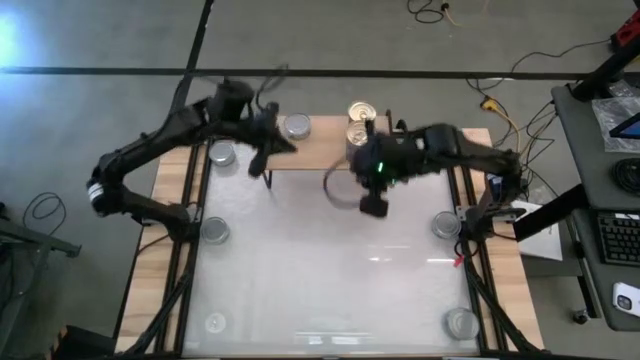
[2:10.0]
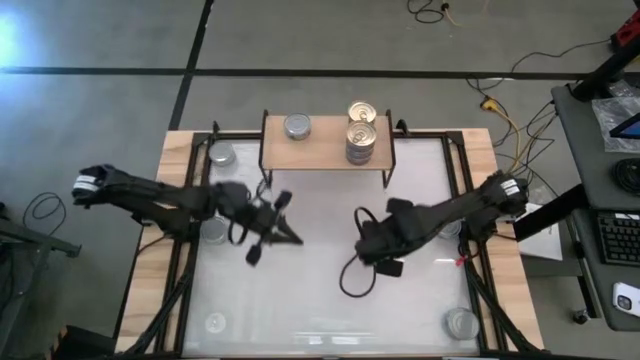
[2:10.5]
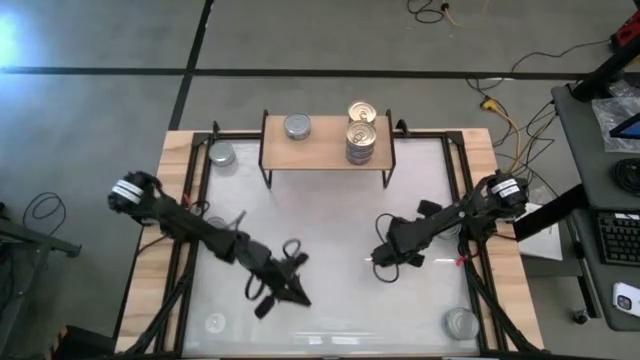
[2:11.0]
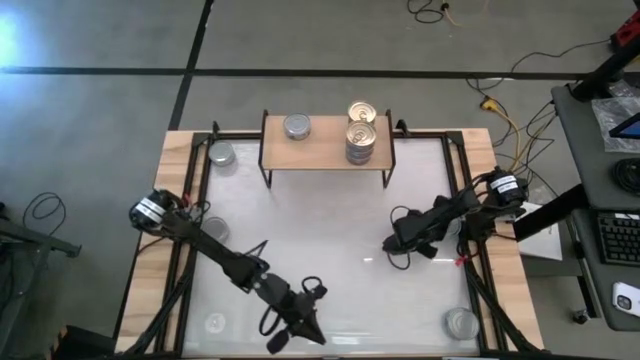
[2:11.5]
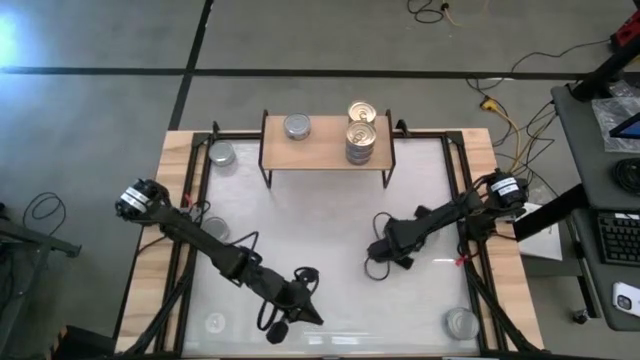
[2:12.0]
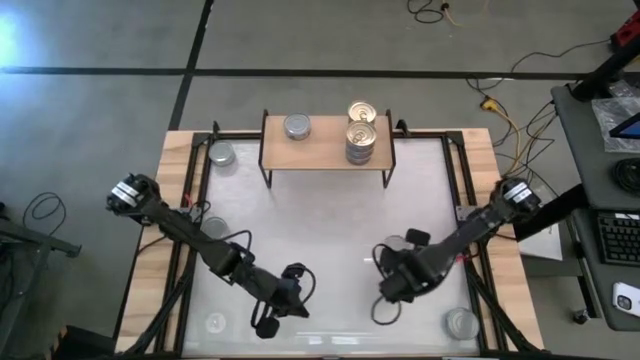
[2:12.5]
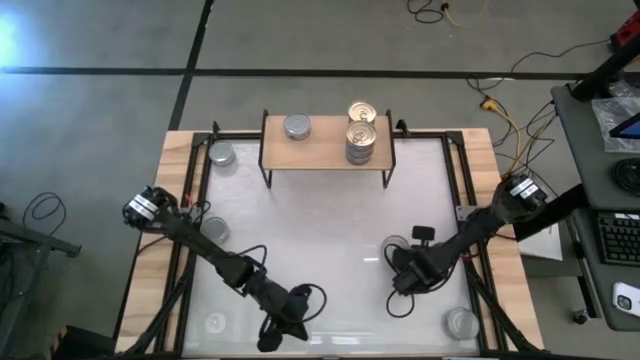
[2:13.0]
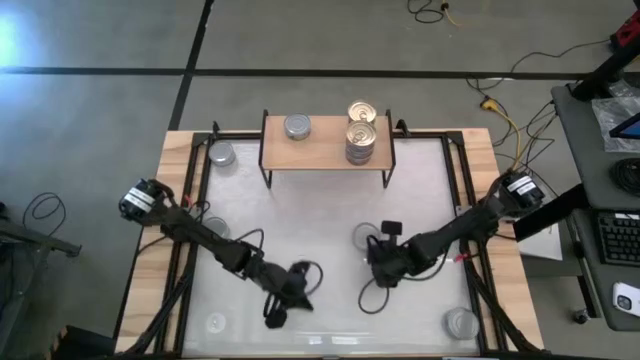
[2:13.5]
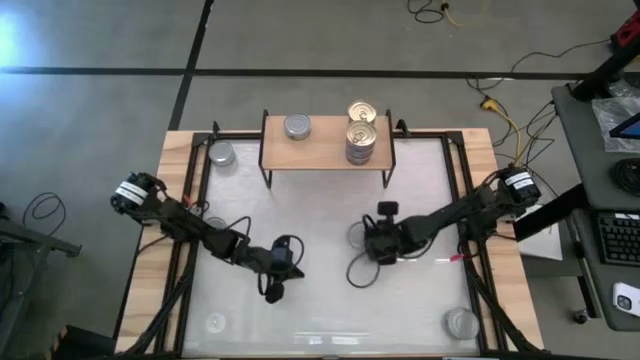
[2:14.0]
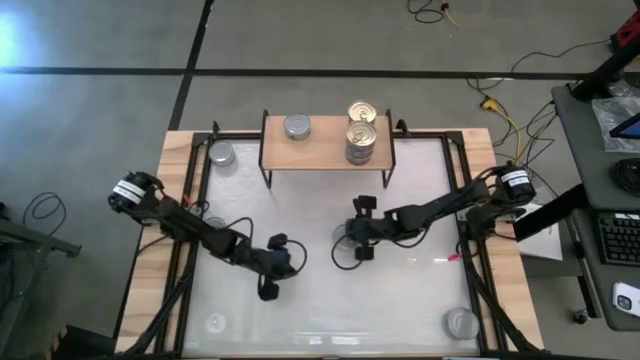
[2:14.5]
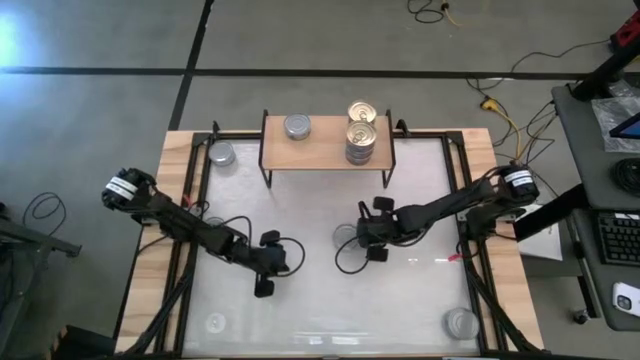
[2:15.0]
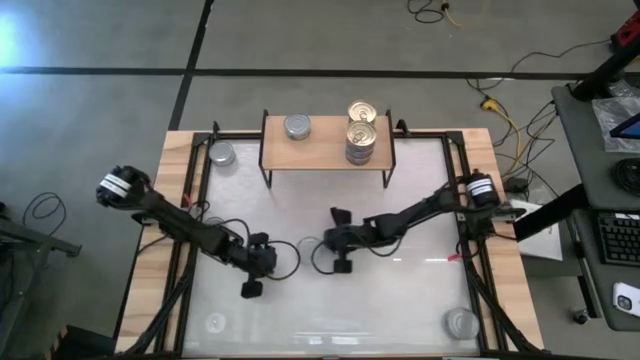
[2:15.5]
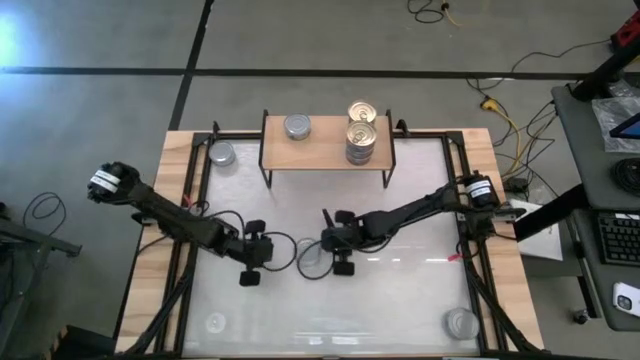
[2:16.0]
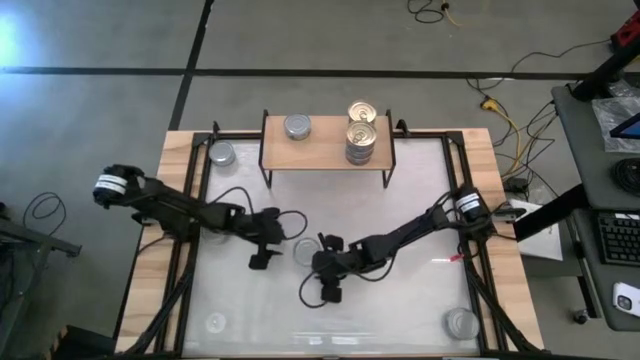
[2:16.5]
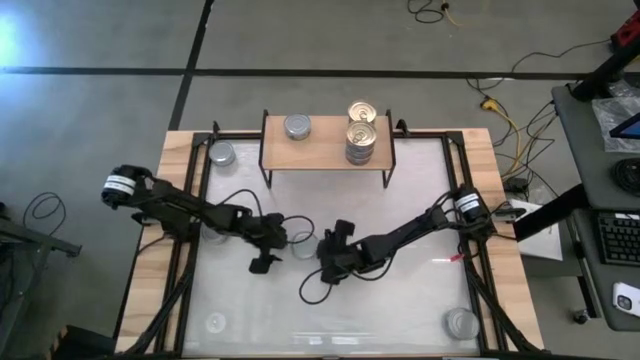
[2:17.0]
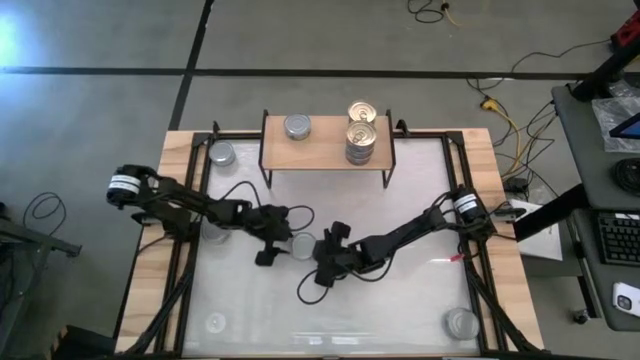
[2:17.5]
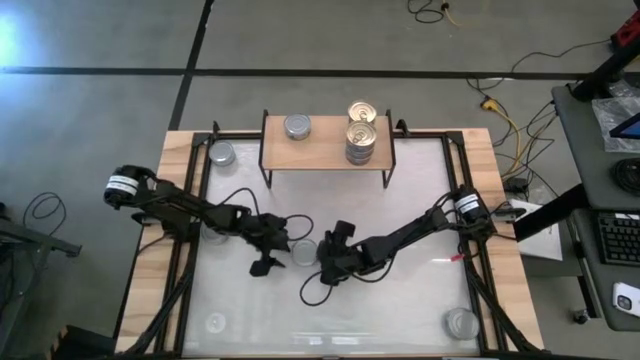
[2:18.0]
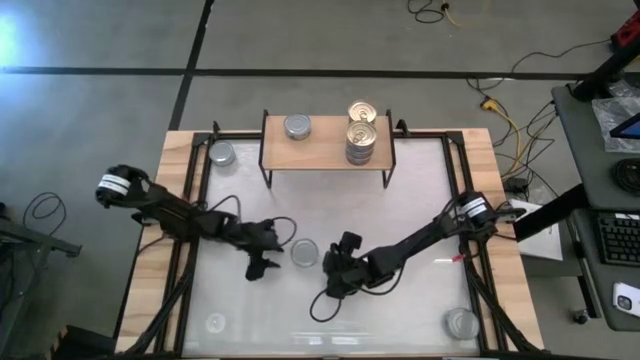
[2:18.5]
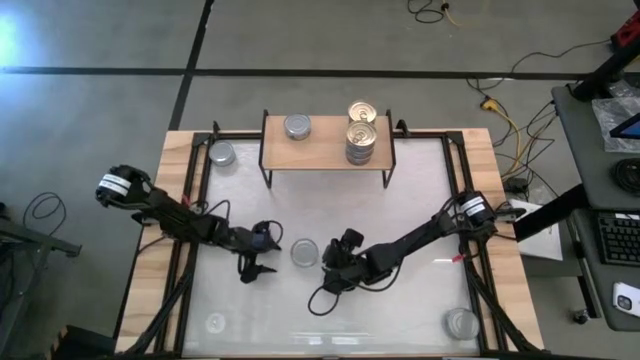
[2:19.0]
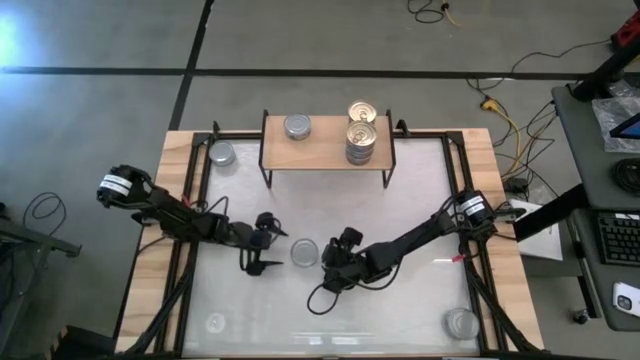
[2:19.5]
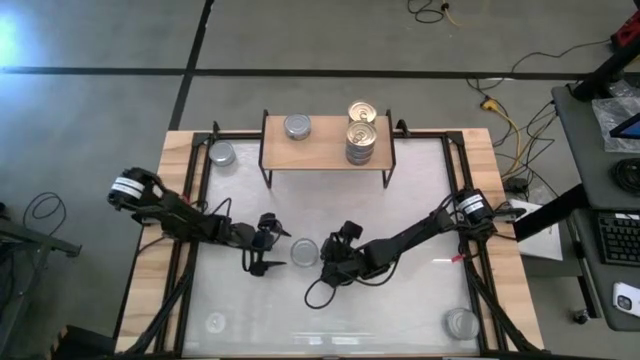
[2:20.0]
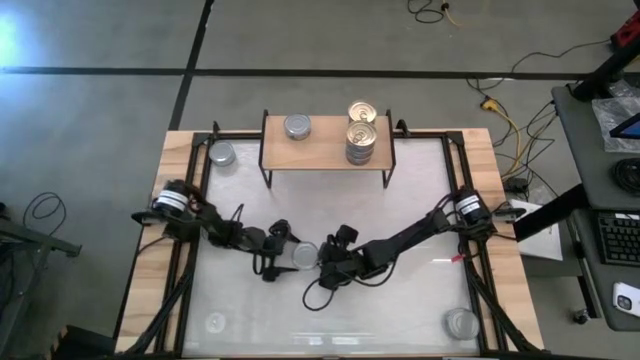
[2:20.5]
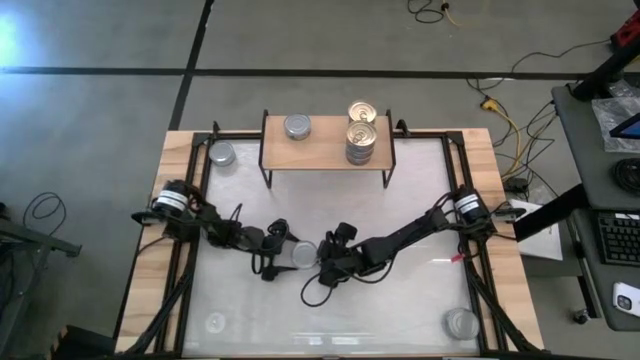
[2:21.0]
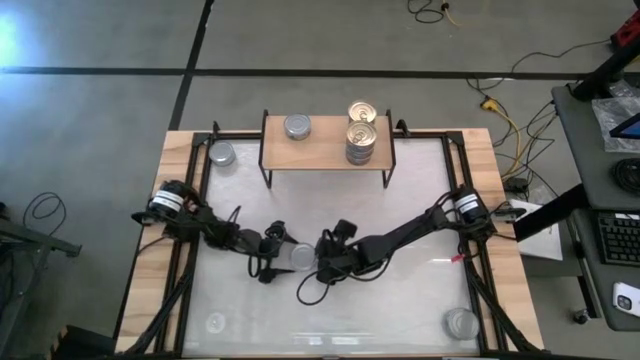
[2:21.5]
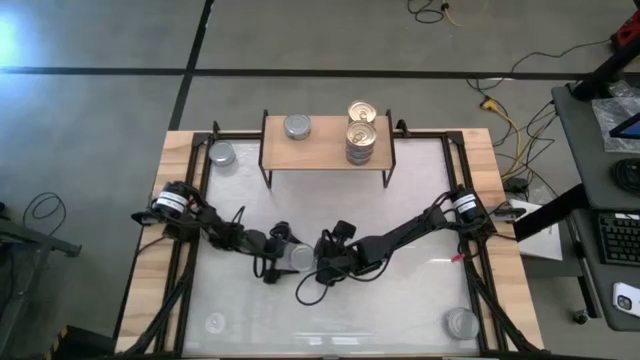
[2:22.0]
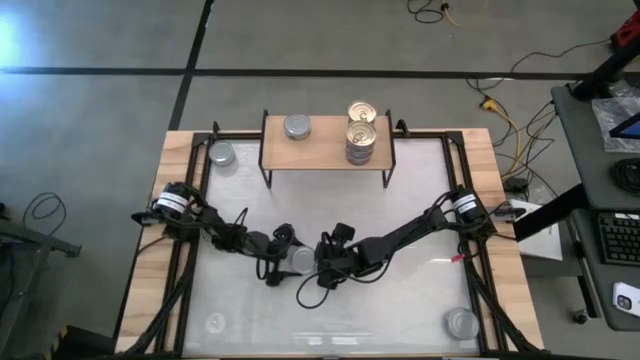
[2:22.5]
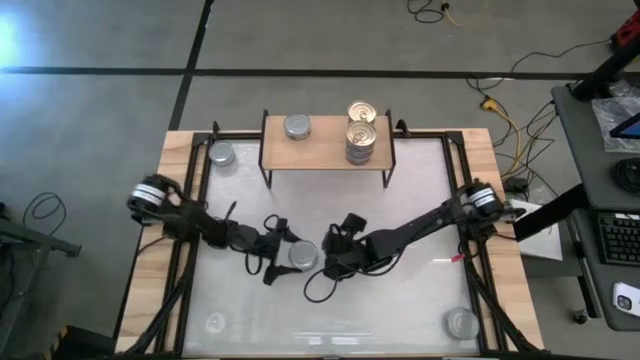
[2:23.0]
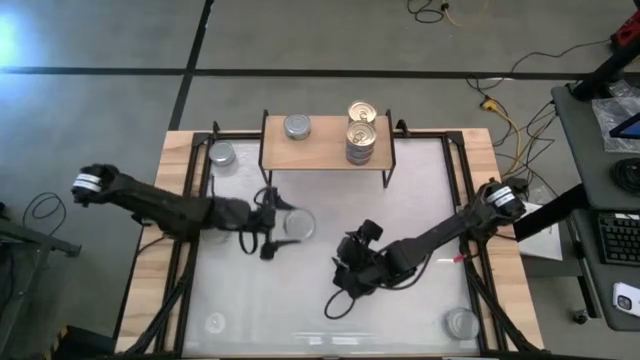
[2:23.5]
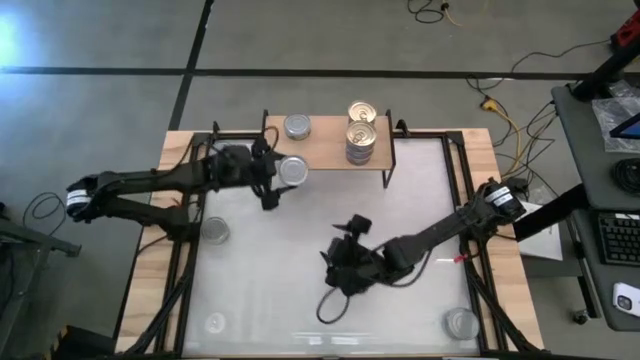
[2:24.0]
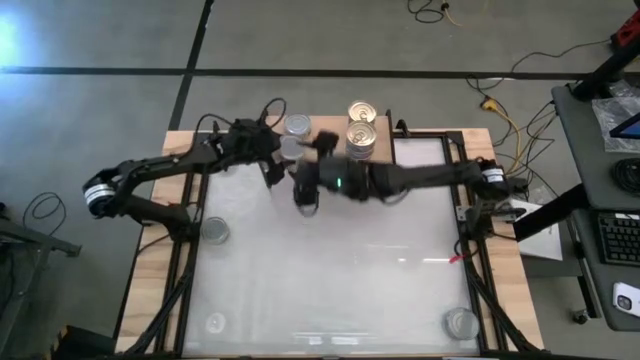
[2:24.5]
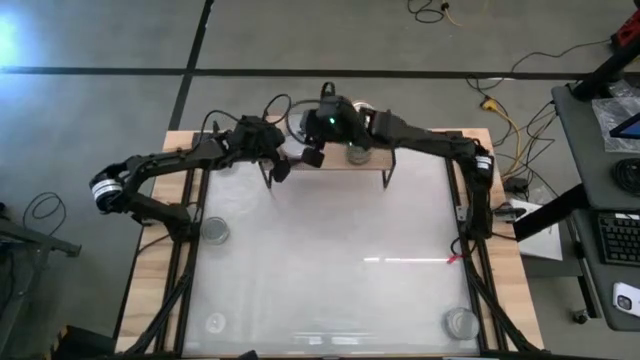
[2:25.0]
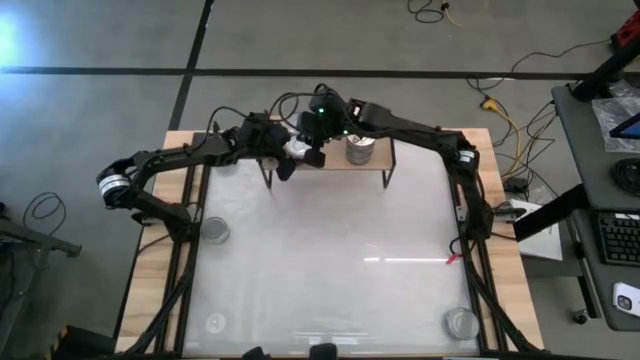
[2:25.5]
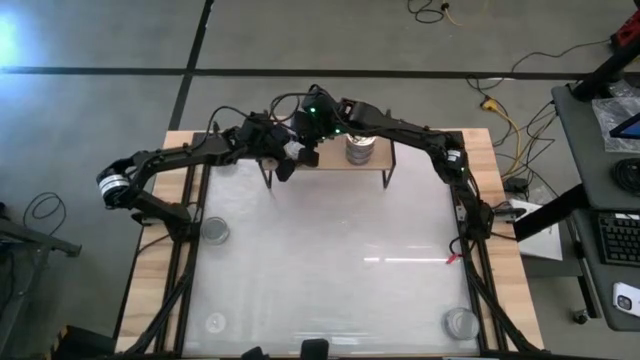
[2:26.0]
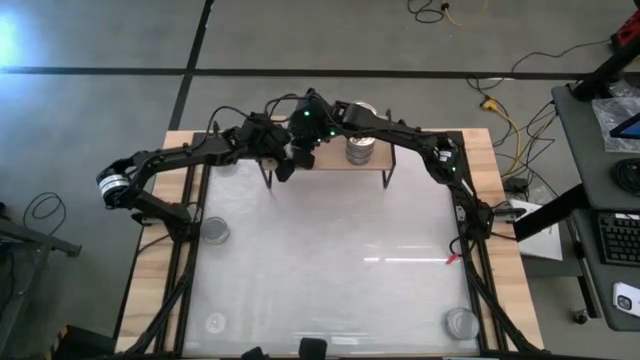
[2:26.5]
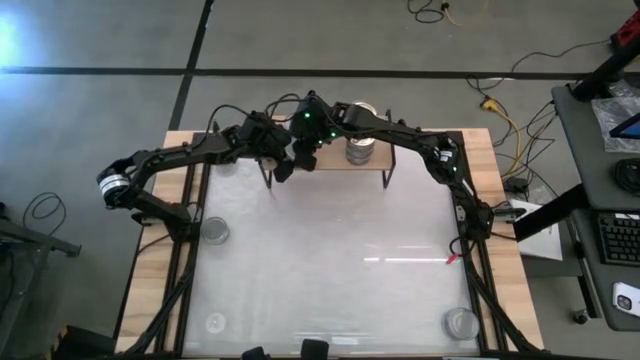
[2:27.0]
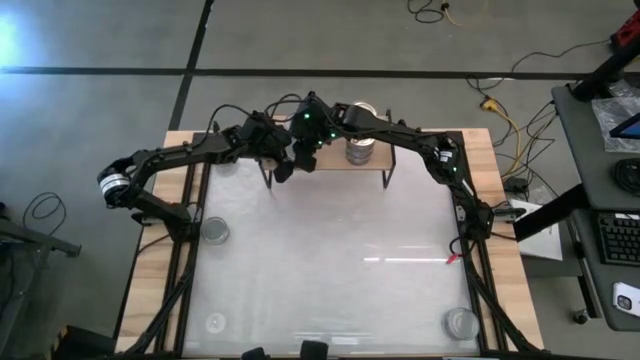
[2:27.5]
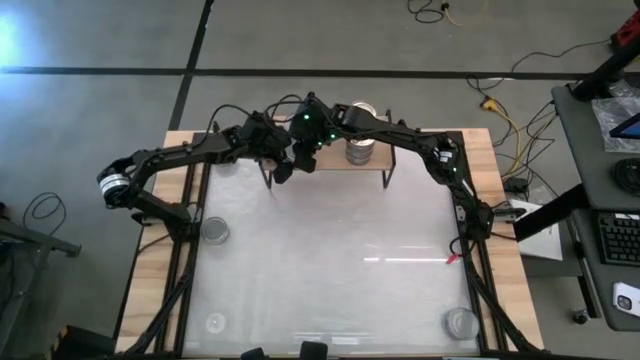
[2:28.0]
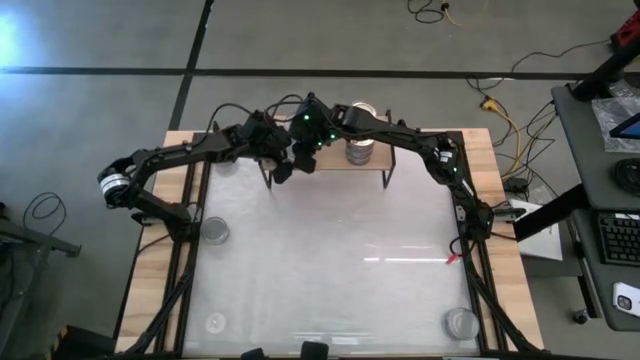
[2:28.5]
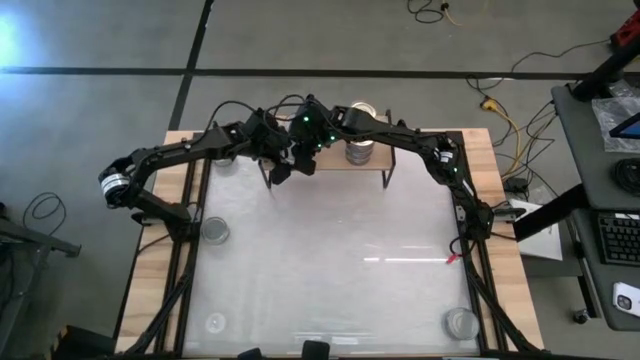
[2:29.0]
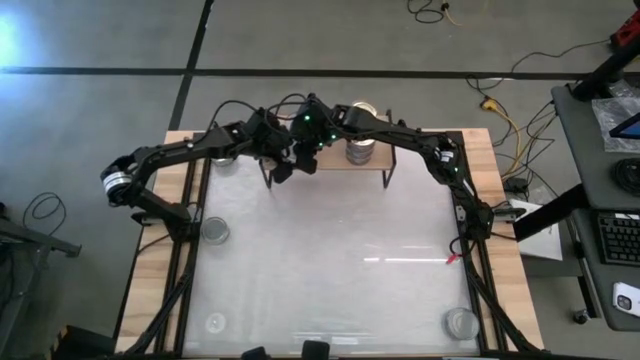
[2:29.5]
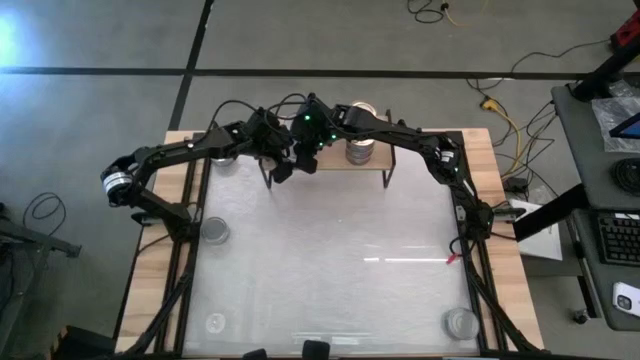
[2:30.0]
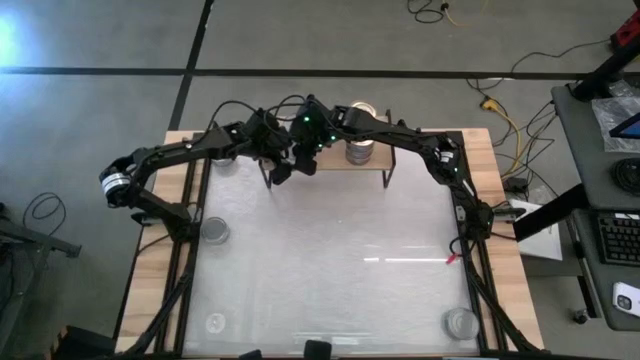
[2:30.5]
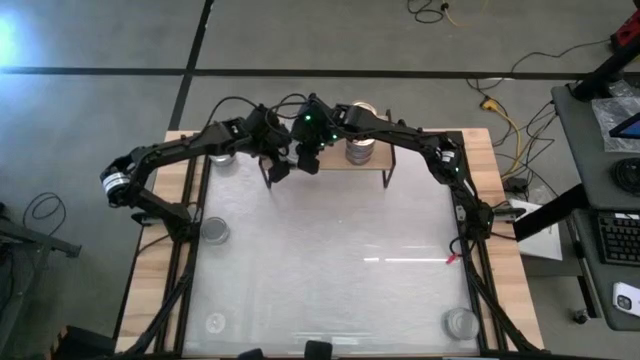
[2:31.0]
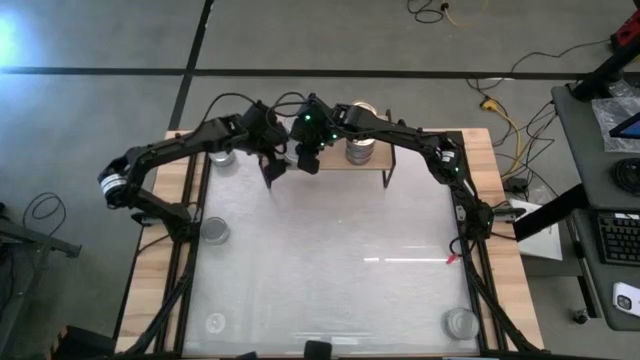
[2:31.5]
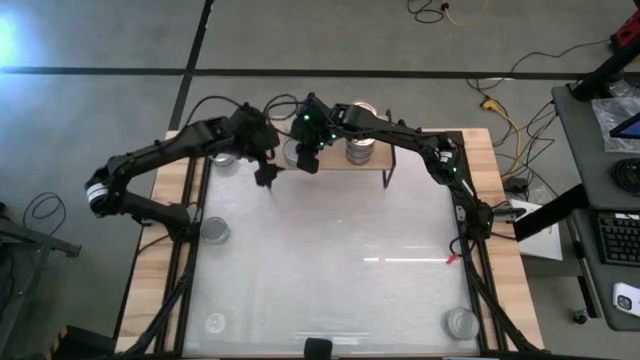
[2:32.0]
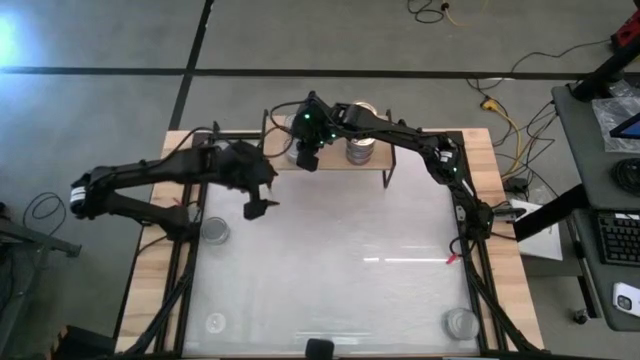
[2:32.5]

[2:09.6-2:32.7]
Task: Stack canned seafood by type on shelf
Put the green tuna can on the shelf
